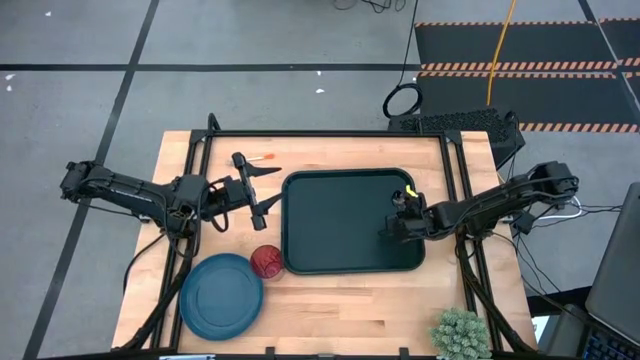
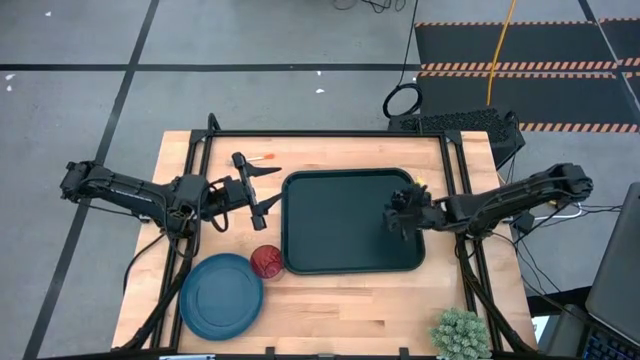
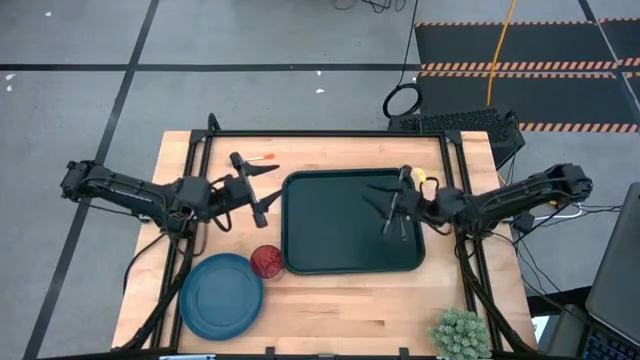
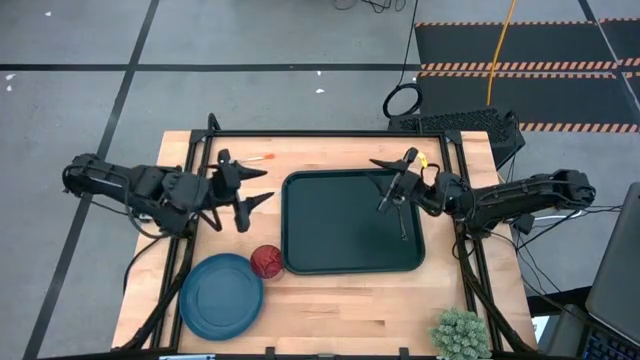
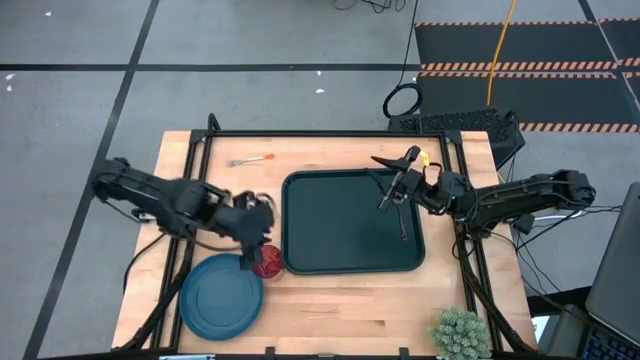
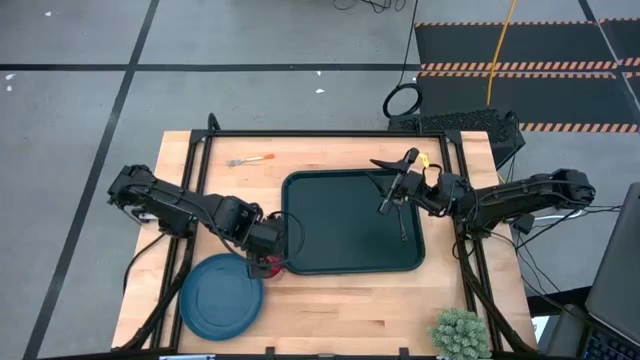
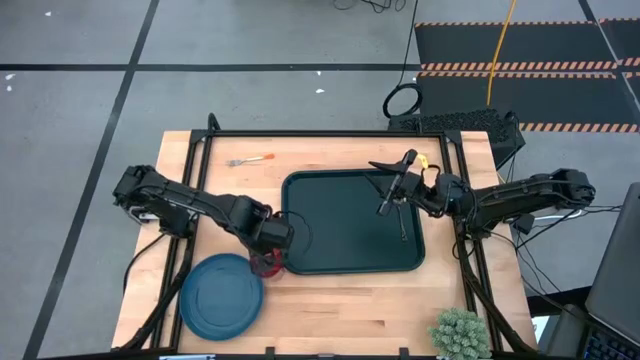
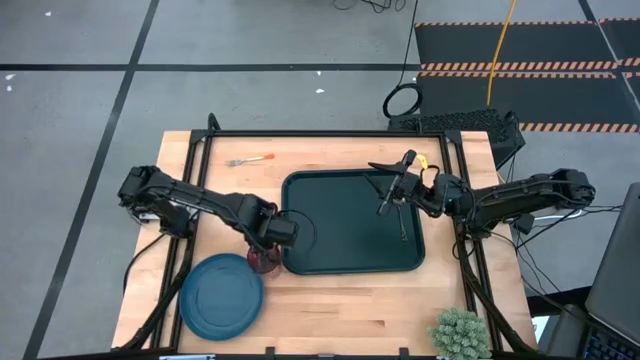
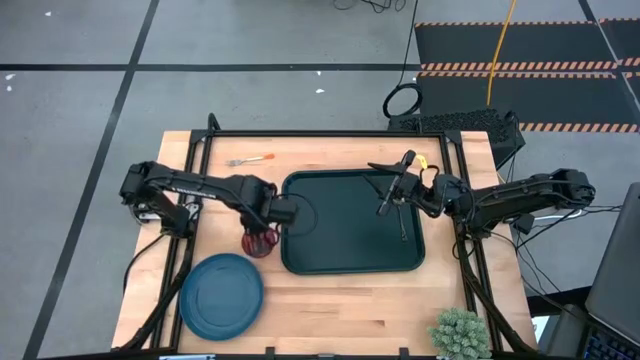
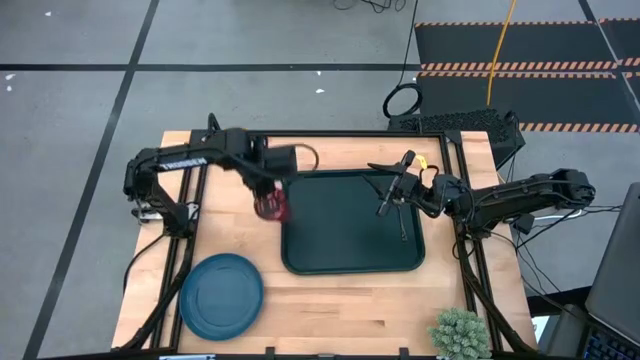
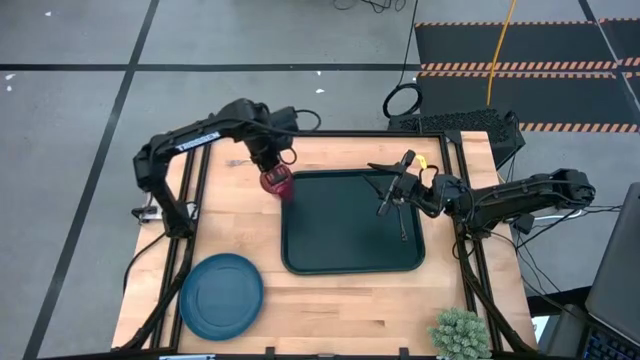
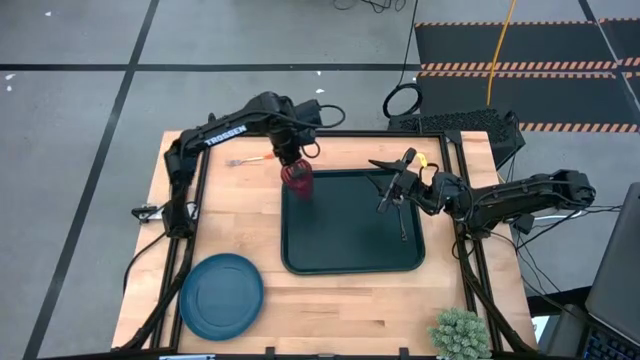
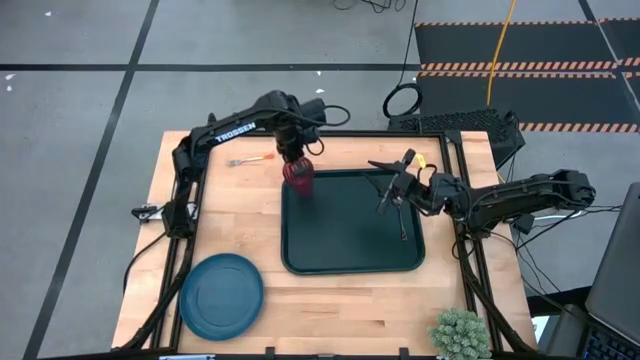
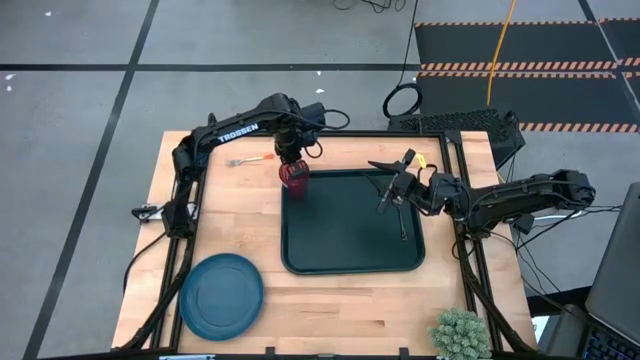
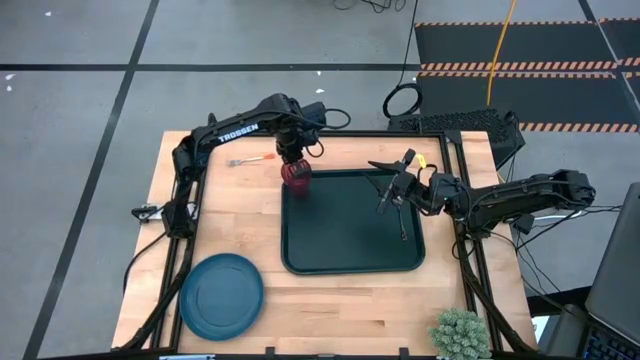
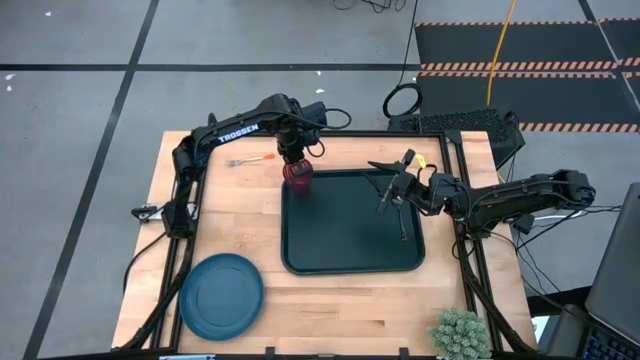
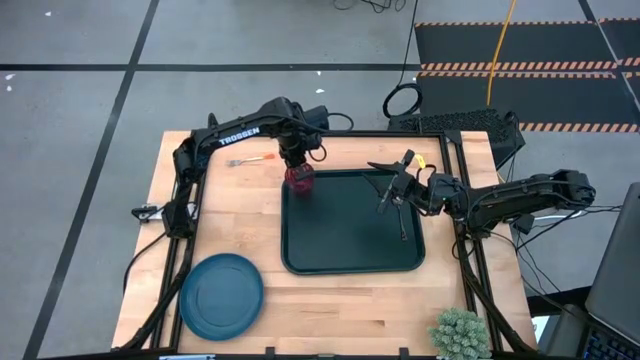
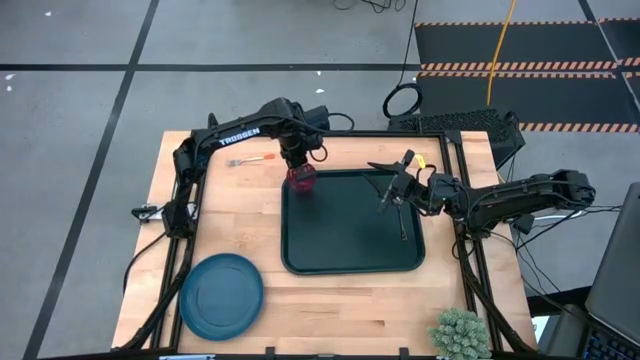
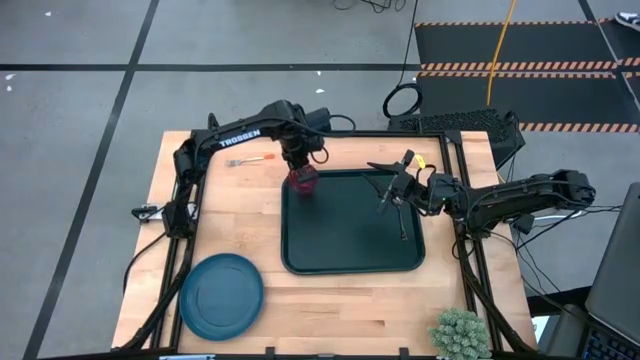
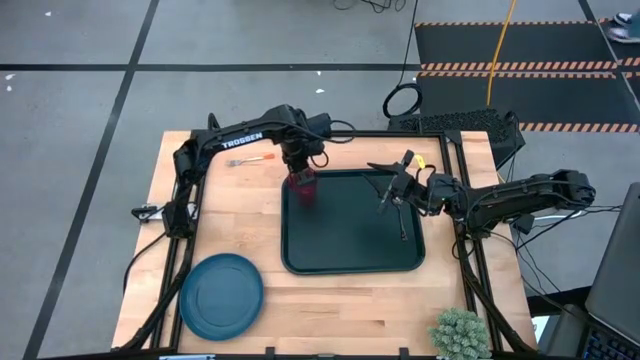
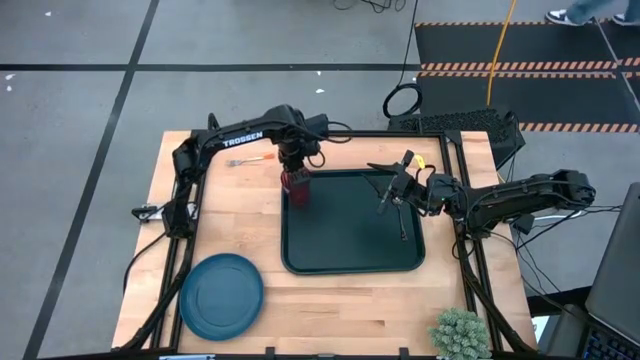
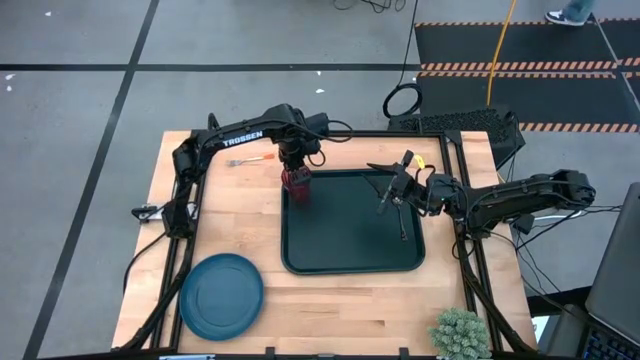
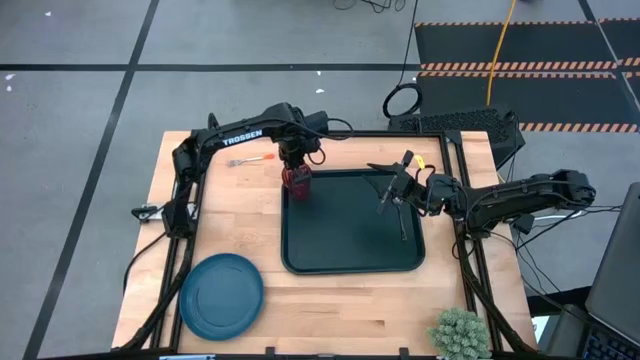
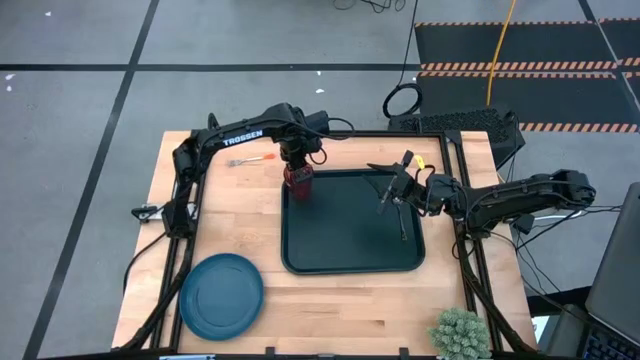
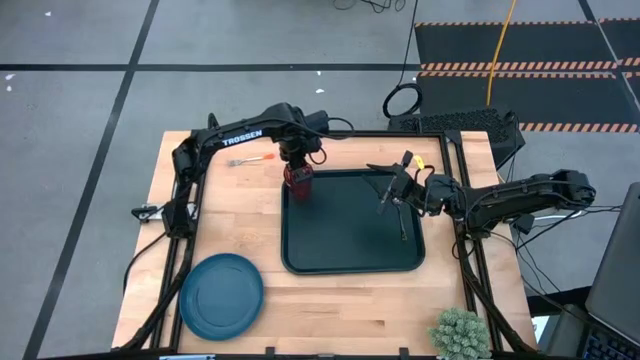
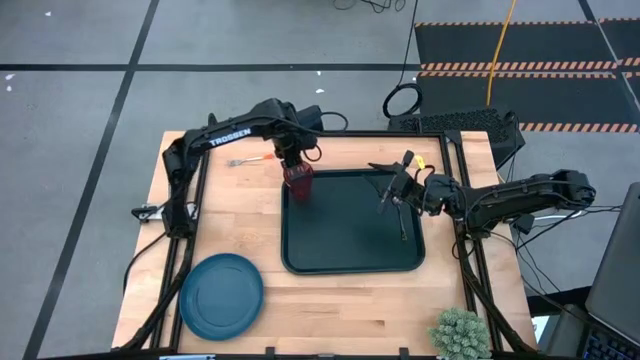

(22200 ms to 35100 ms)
Task: Pick and place plate/cup/fork/spoon on tray
Put the red cup to the top left of the black tray

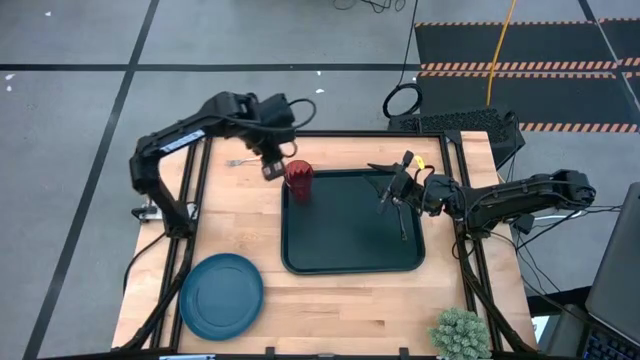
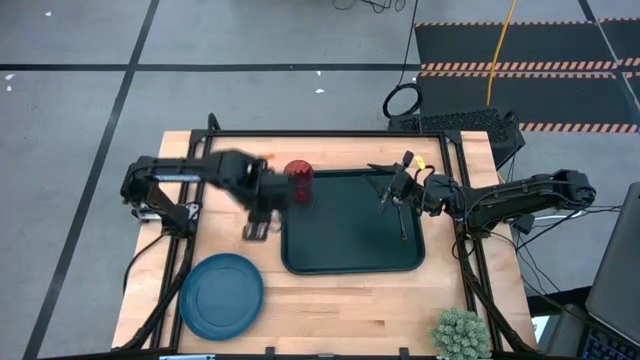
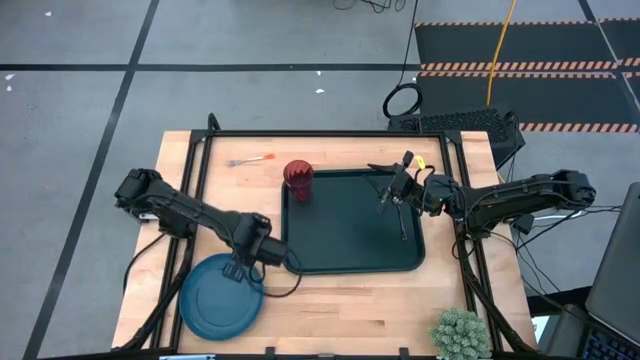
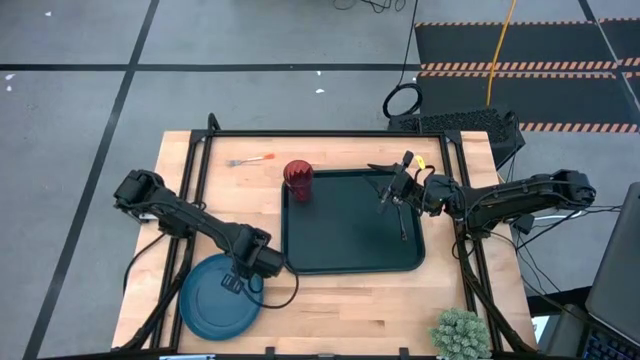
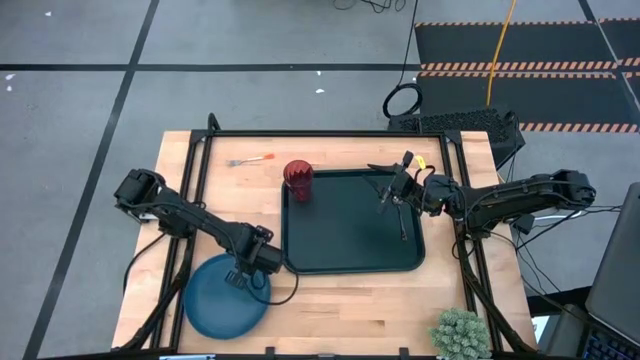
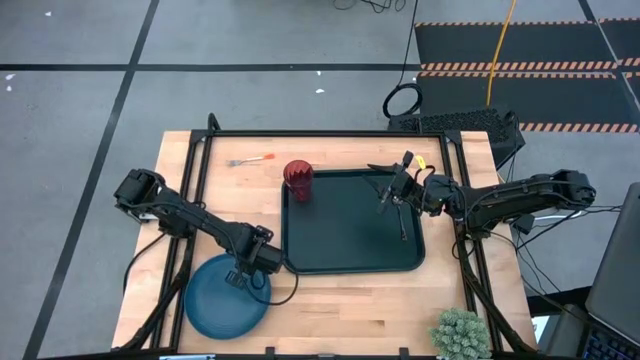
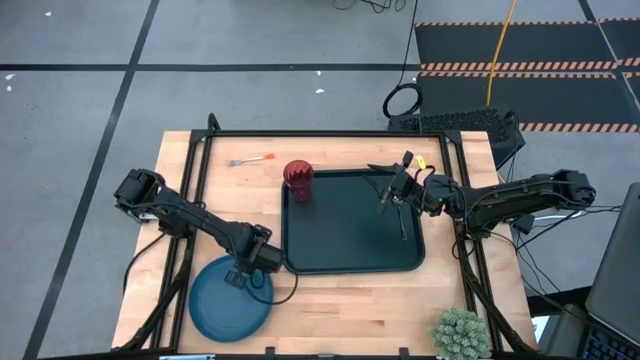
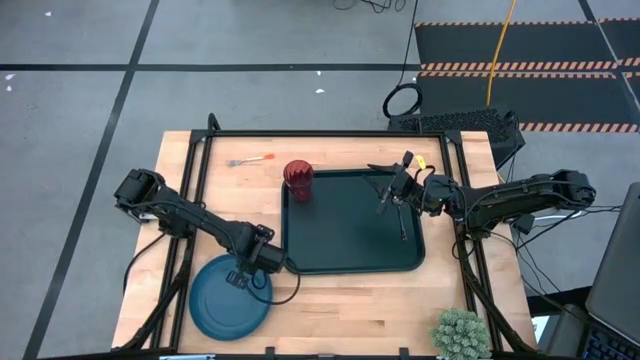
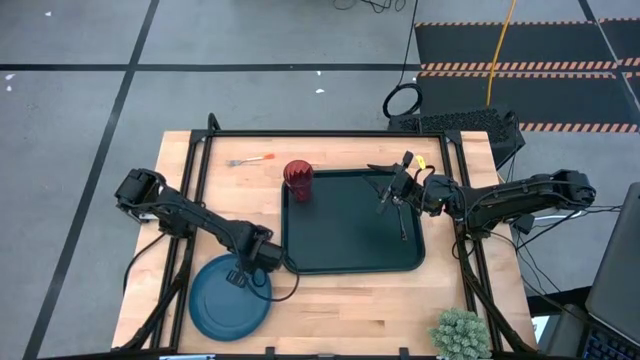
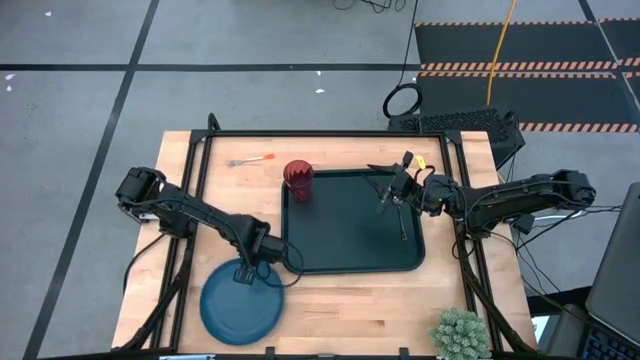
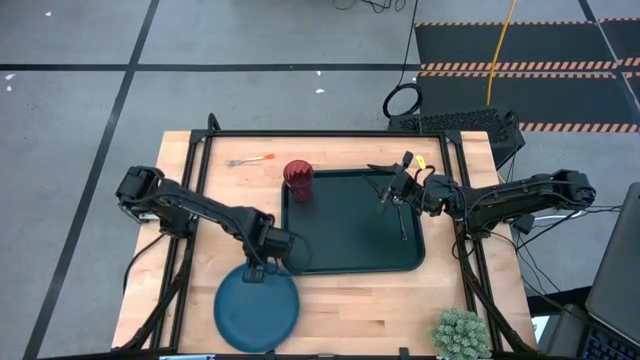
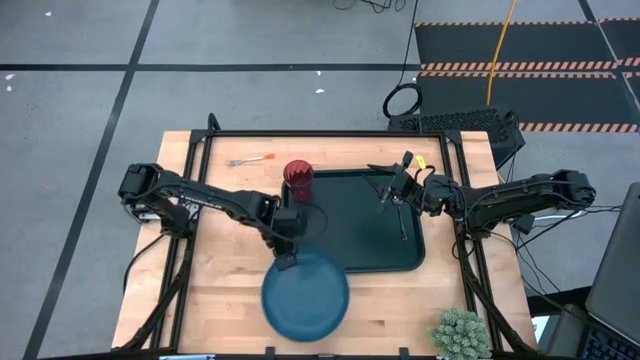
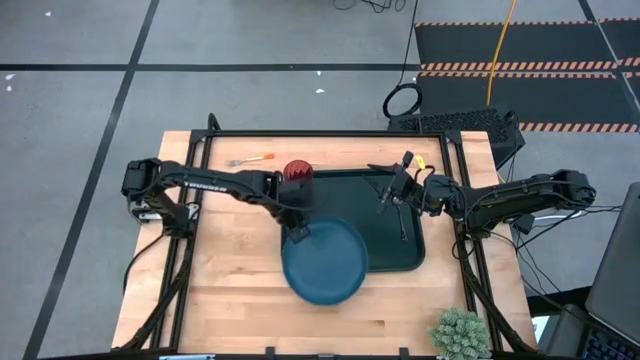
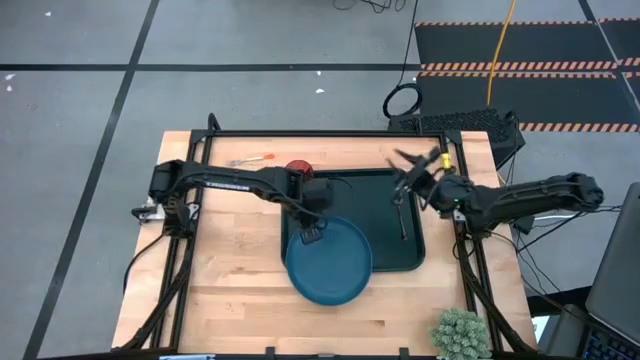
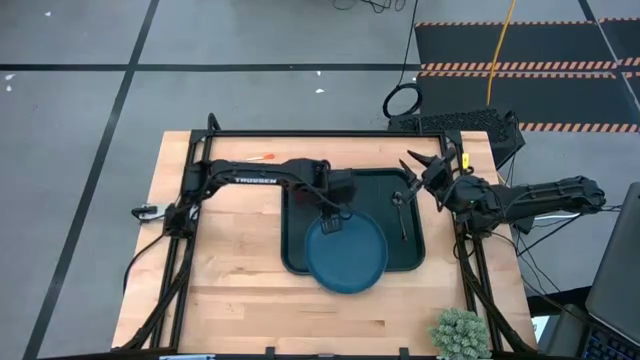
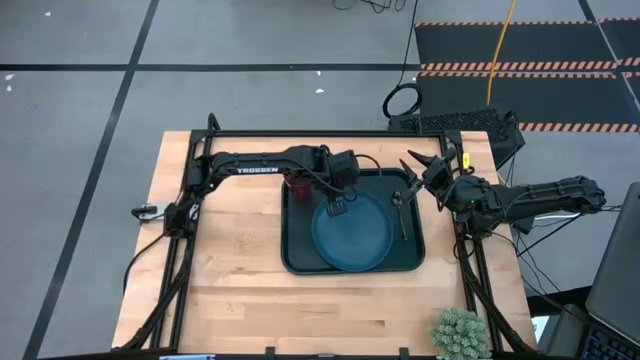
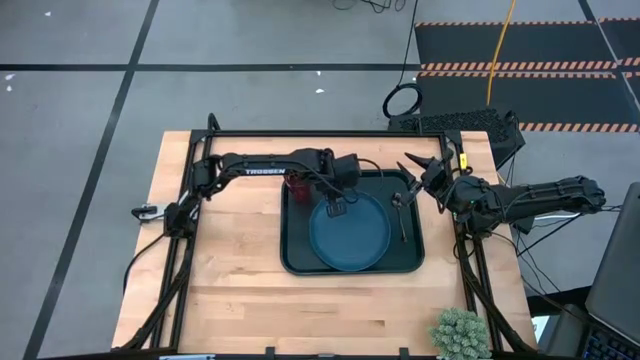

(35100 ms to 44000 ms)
Put the blue plate to the left of the black spoon on the black tray

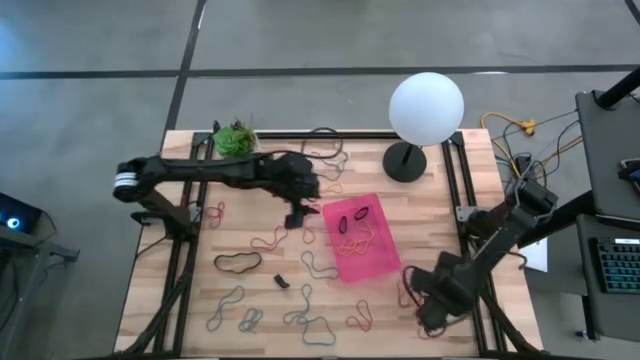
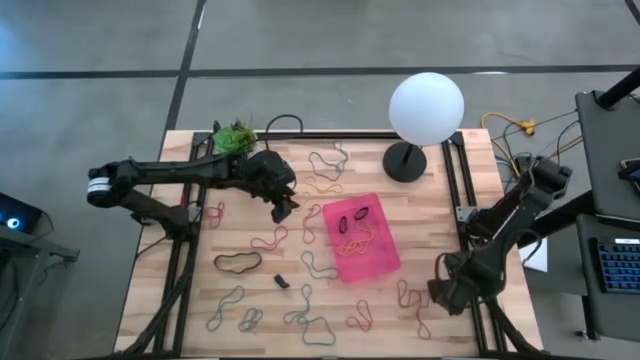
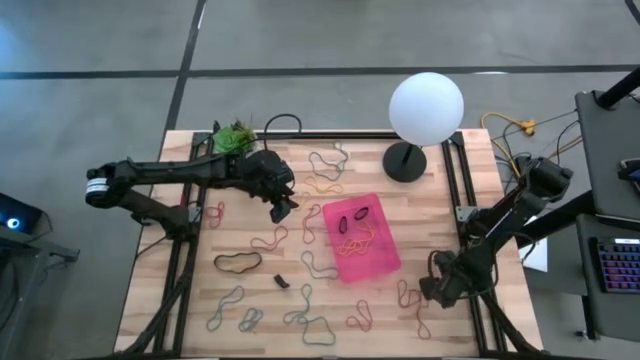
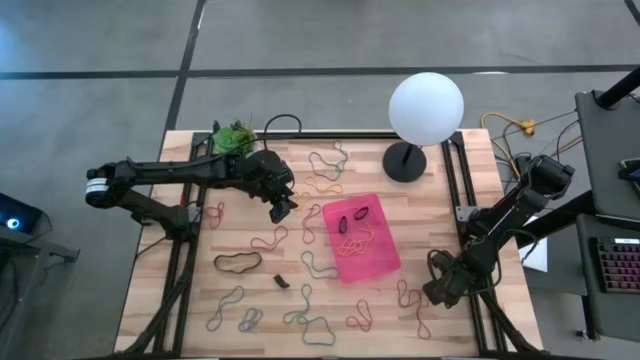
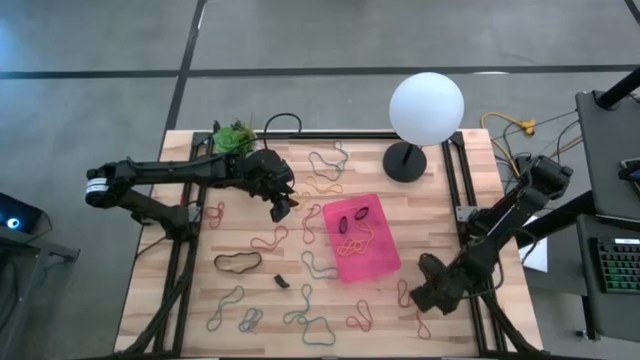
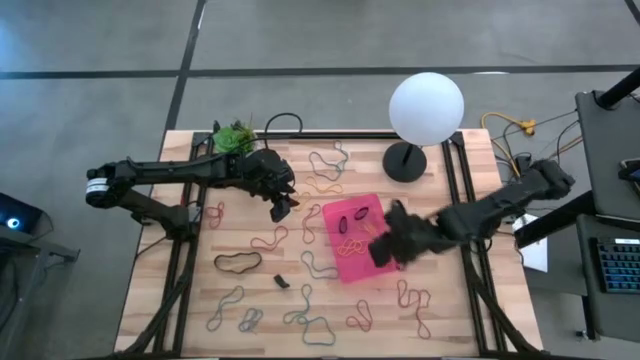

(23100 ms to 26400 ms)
Task: Pick and place rubber bands into bin
Put the yellow rubber band into the pink bin
